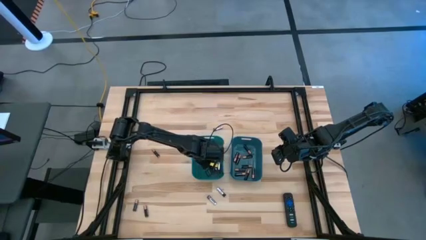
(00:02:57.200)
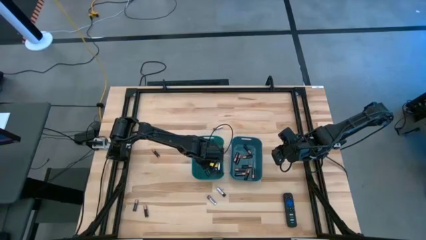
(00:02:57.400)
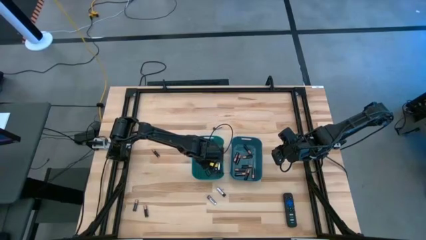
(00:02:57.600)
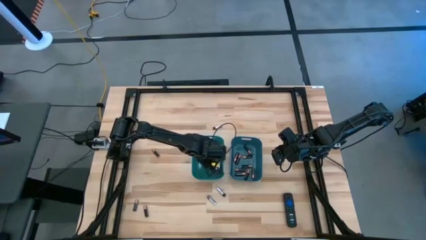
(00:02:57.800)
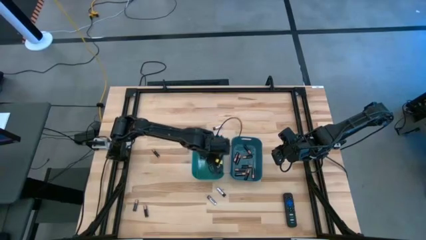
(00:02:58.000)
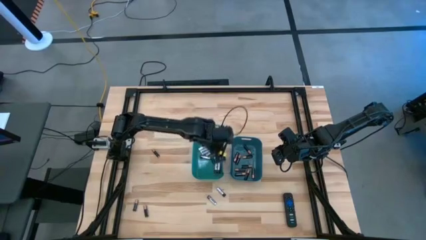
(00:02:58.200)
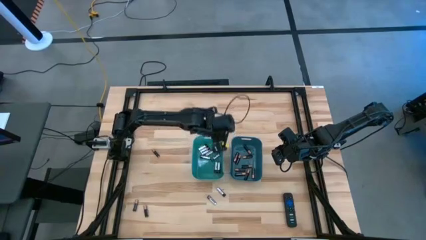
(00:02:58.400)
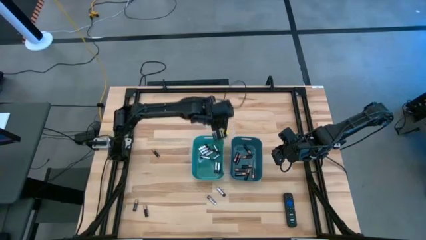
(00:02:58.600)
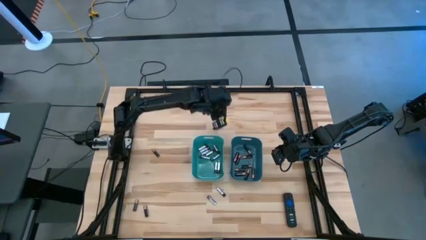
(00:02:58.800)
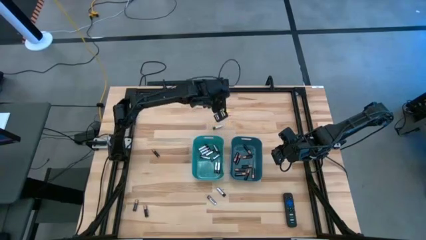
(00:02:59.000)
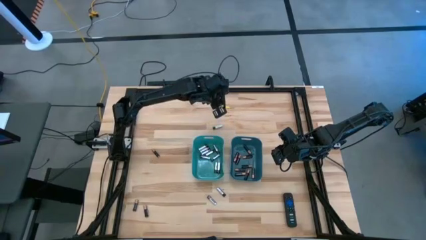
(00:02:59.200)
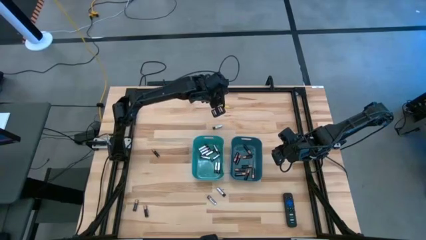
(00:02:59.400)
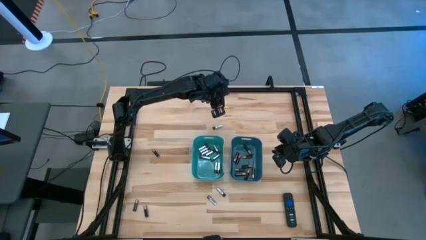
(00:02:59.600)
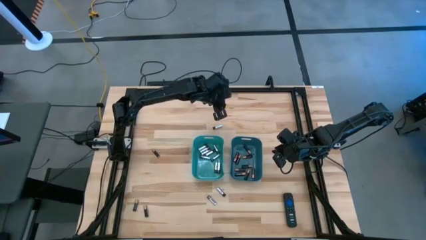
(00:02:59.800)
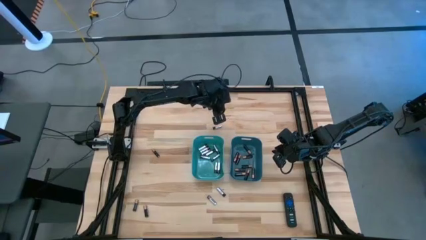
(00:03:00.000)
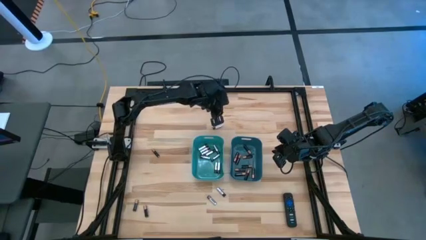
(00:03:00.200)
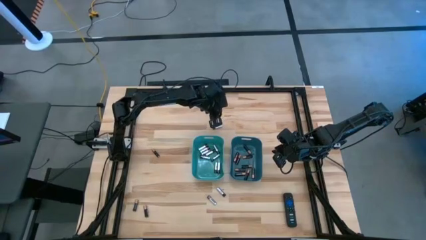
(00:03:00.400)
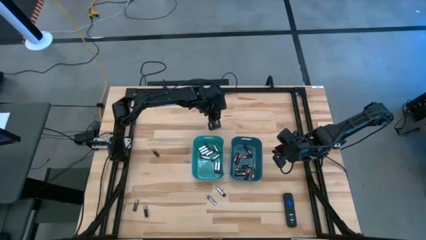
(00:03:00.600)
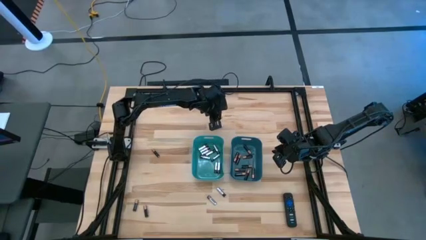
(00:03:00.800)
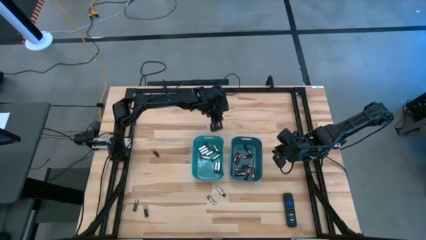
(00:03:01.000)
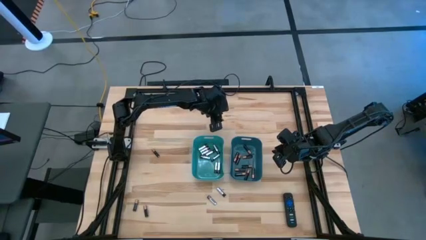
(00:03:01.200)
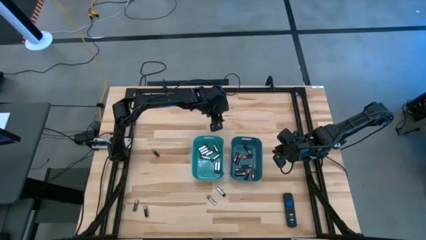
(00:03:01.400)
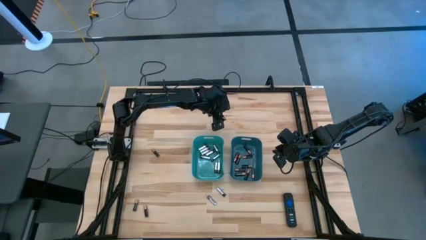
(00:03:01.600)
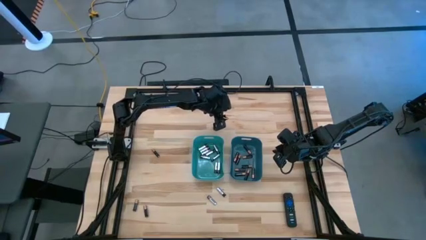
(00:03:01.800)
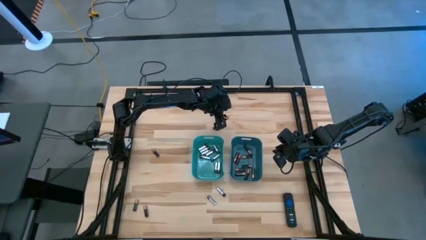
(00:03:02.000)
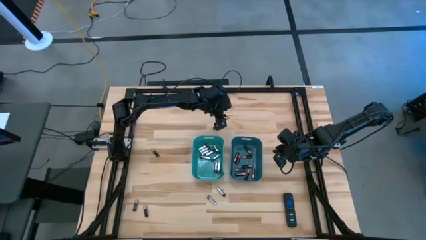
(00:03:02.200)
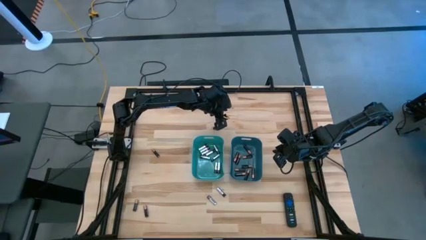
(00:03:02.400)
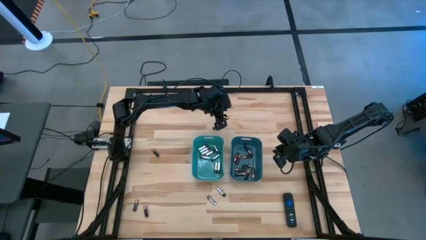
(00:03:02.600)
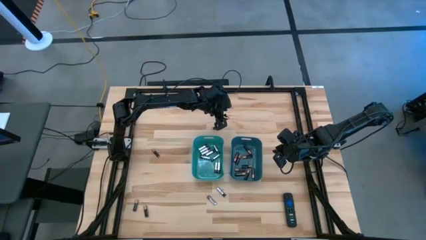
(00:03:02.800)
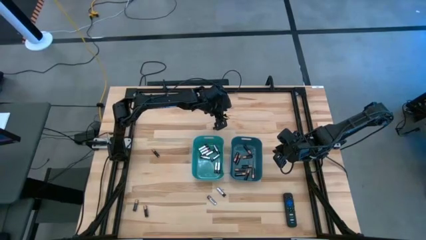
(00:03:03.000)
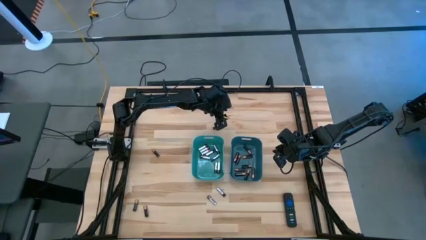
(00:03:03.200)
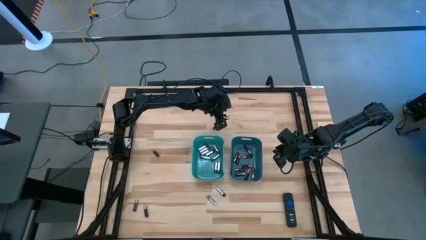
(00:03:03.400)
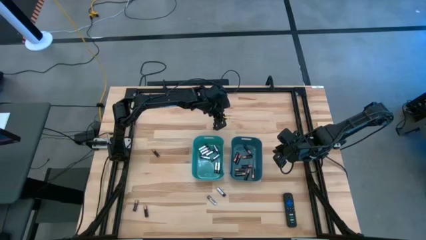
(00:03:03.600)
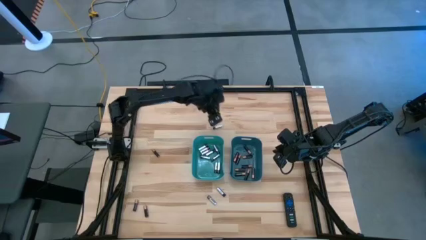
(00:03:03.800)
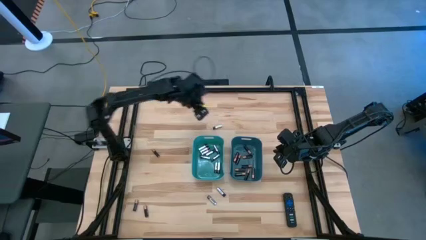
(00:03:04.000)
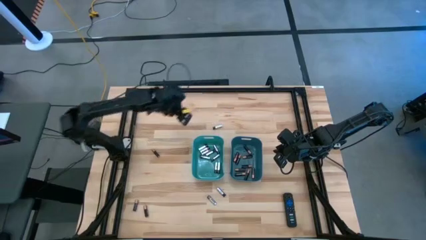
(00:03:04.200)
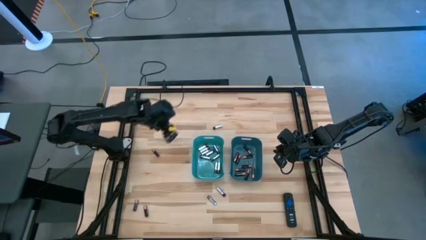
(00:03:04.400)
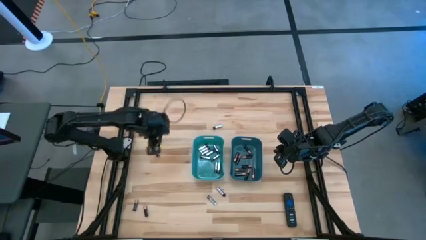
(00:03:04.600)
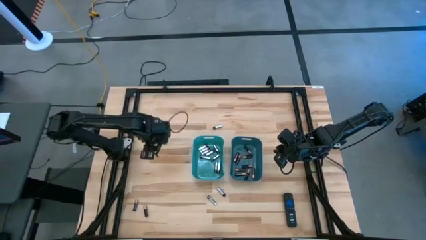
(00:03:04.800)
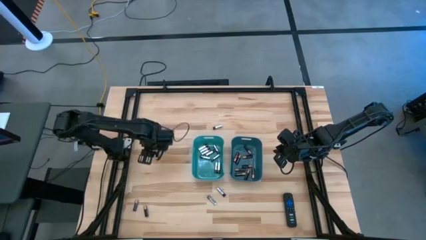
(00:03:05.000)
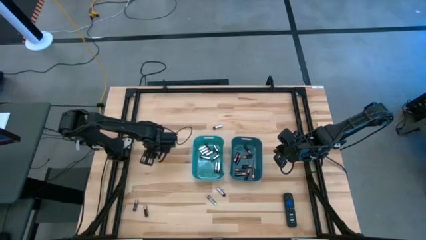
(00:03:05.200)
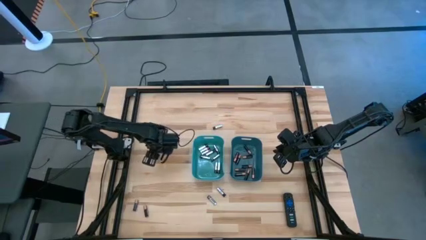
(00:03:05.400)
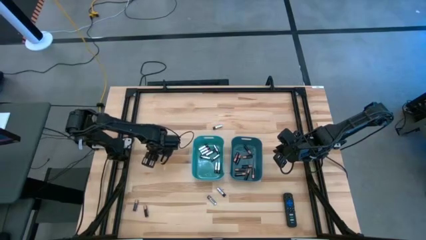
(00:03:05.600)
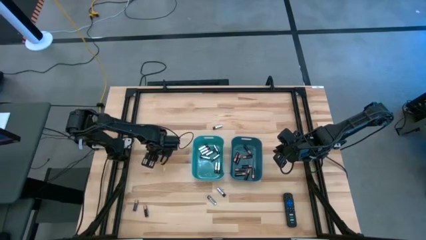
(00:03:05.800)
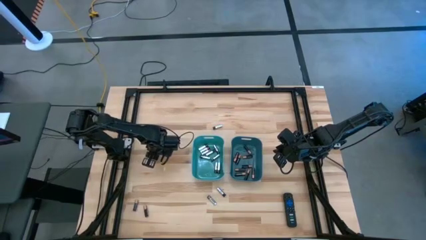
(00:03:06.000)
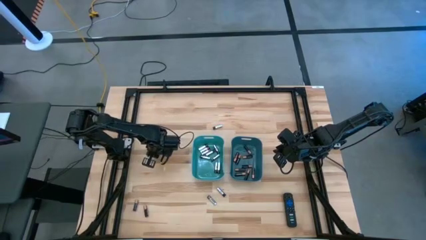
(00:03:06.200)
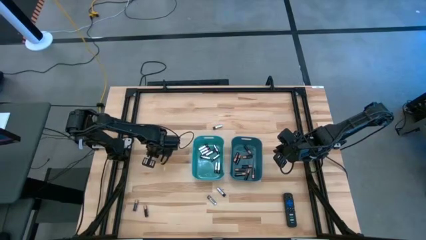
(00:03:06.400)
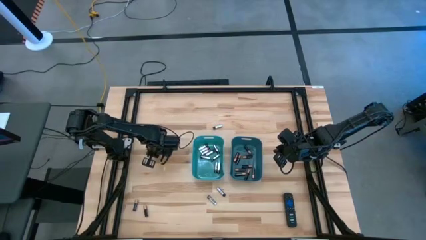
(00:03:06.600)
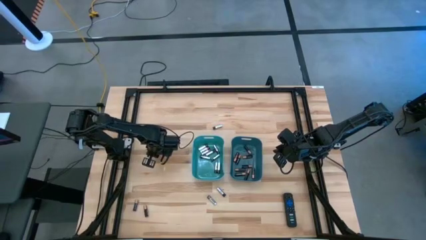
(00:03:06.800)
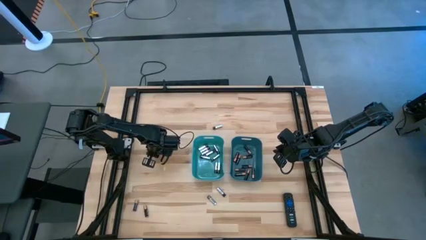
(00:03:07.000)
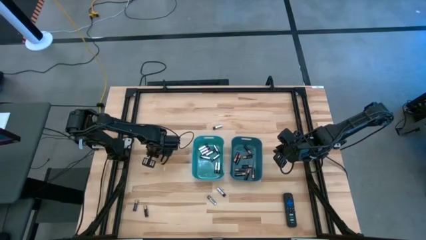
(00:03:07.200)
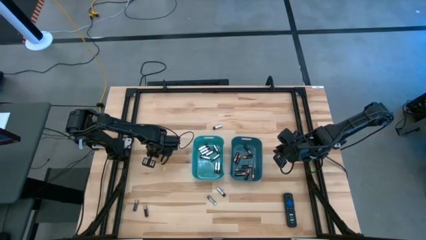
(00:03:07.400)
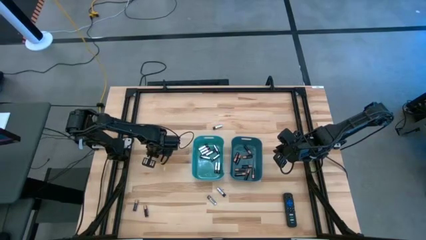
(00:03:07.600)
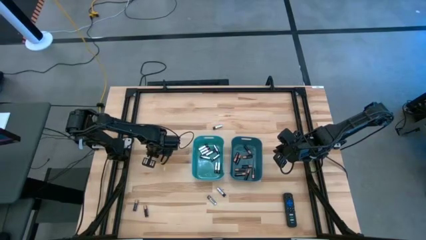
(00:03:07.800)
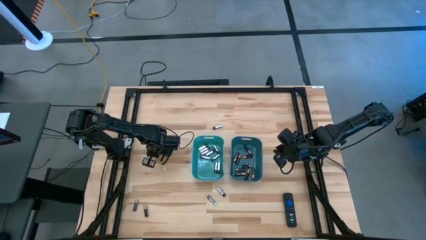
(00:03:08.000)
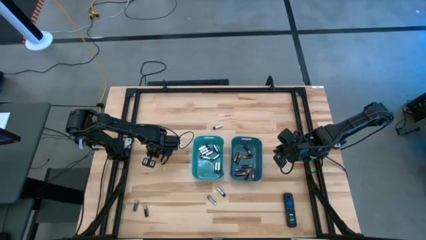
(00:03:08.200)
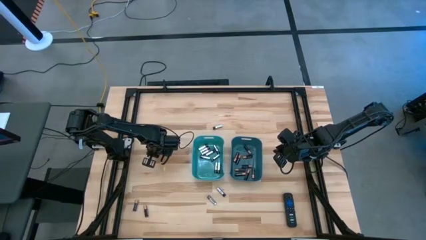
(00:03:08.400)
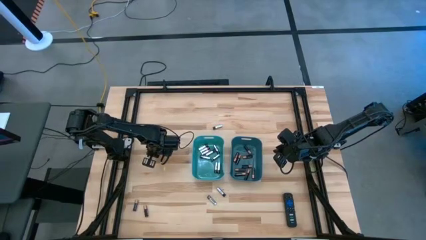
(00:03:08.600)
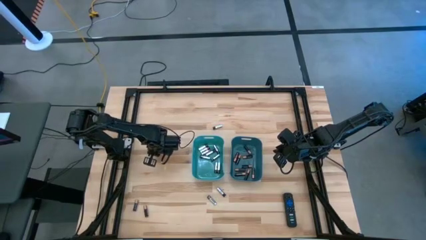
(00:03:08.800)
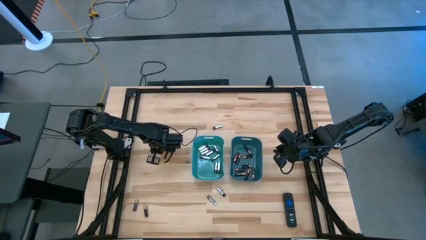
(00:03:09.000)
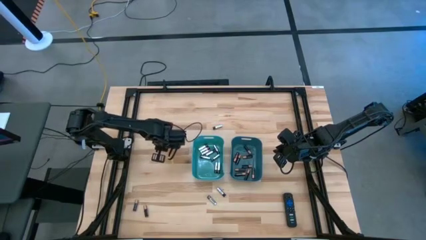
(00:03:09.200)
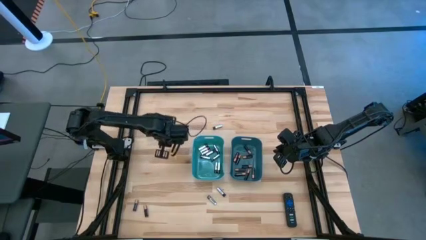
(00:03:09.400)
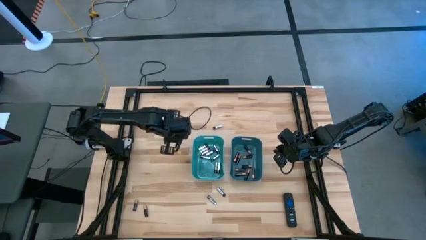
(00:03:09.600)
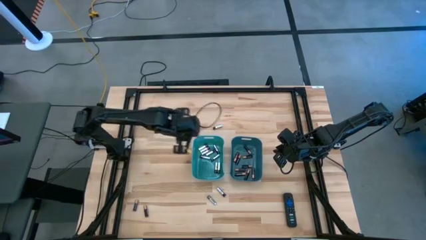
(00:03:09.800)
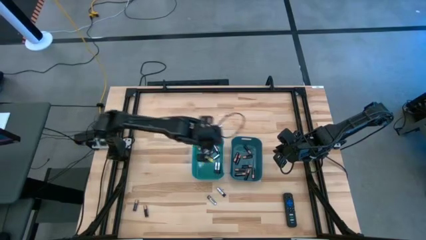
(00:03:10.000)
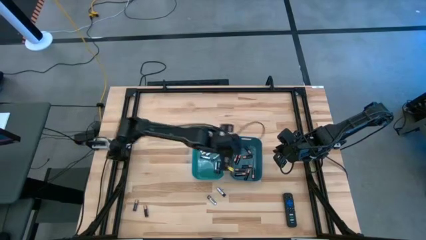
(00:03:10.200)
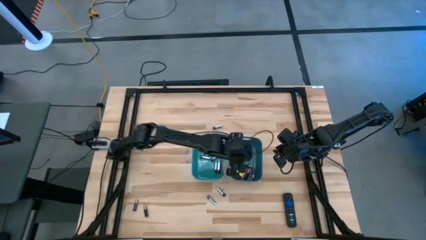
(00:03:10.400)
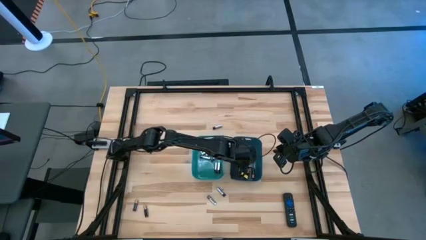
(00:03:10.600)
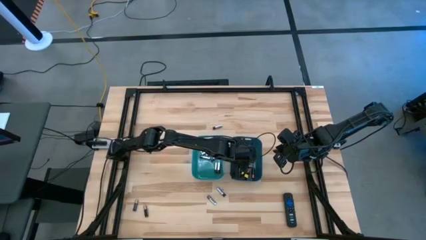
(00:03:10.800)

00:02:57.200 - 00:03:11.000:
Task: Sort batteries
Put the black battery into the blue bin
